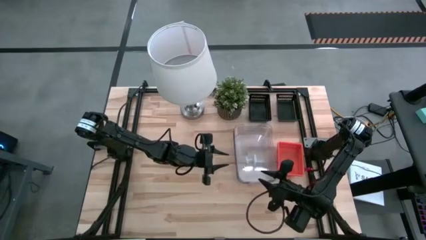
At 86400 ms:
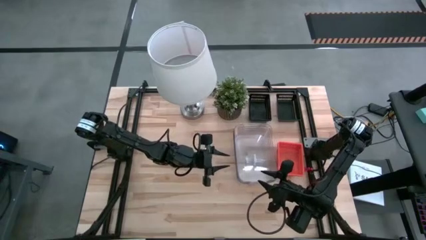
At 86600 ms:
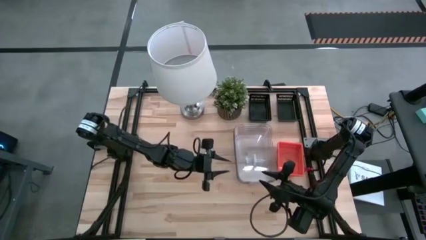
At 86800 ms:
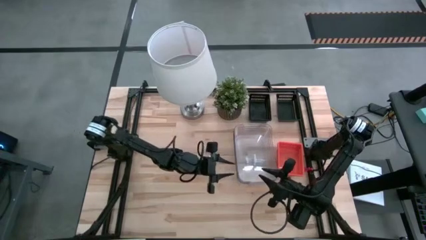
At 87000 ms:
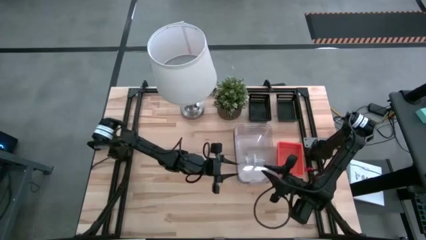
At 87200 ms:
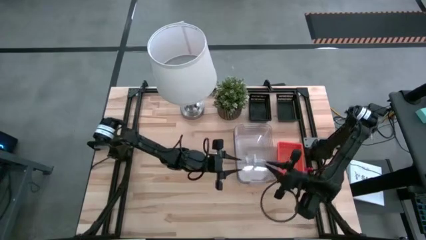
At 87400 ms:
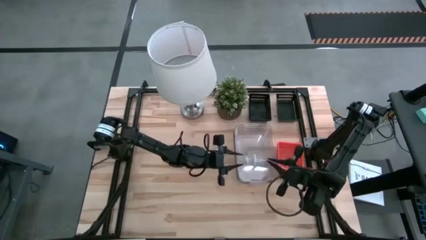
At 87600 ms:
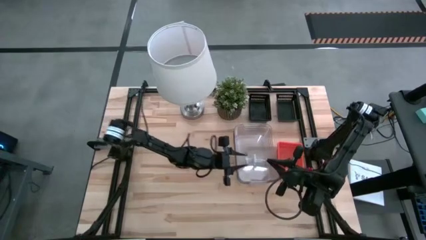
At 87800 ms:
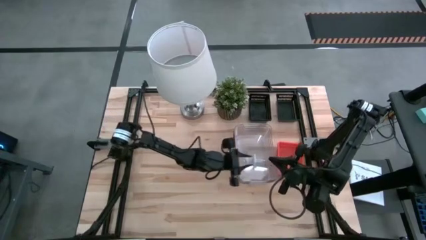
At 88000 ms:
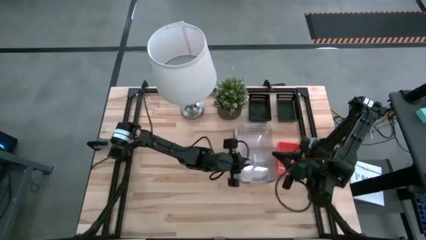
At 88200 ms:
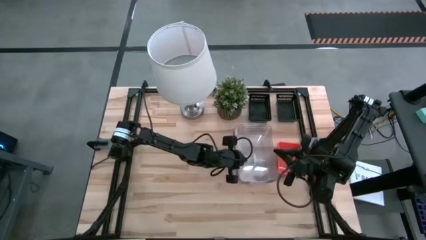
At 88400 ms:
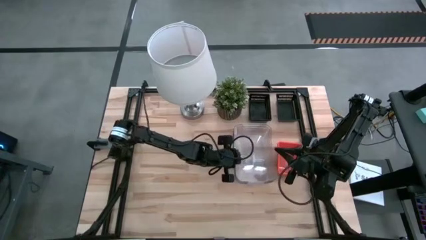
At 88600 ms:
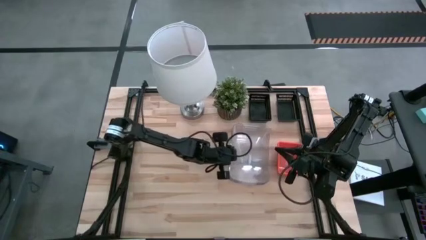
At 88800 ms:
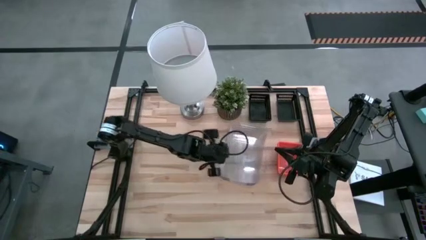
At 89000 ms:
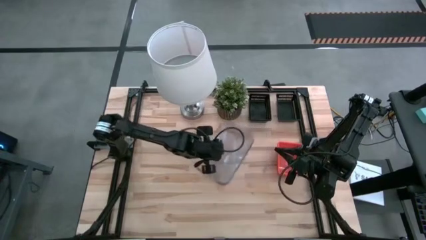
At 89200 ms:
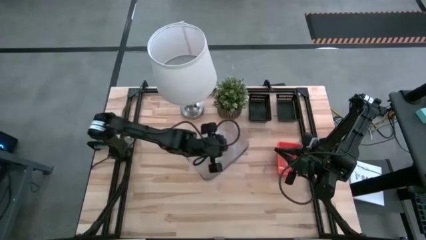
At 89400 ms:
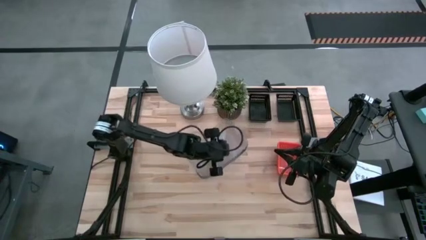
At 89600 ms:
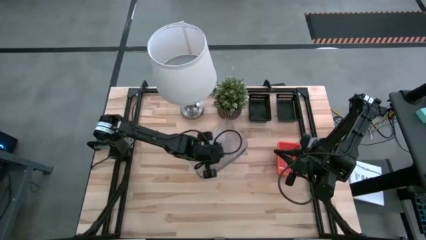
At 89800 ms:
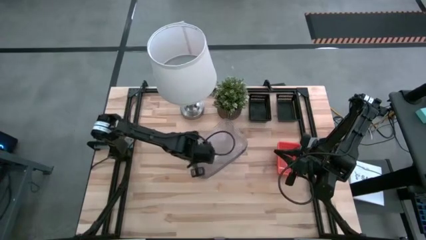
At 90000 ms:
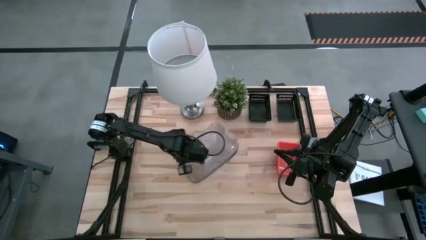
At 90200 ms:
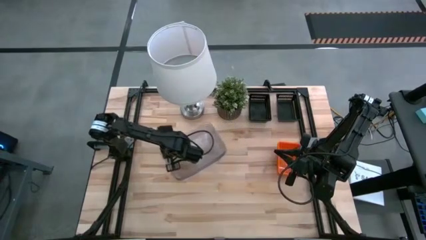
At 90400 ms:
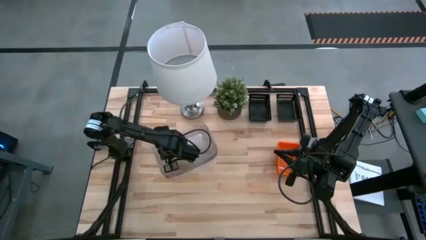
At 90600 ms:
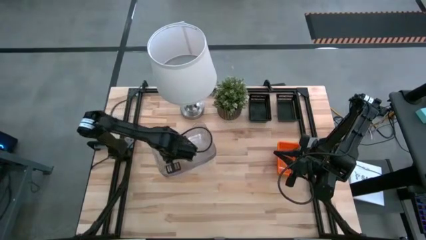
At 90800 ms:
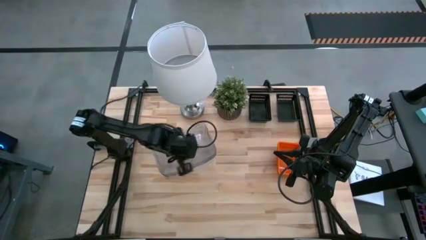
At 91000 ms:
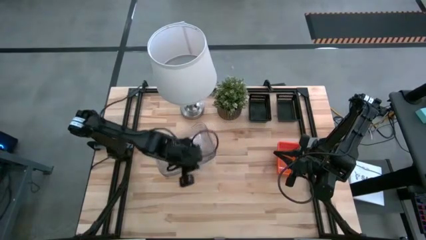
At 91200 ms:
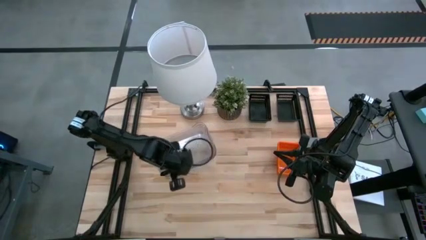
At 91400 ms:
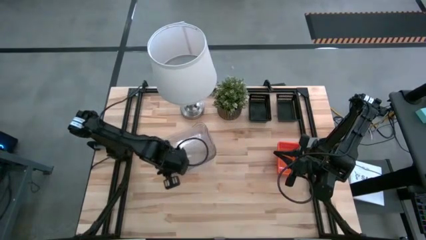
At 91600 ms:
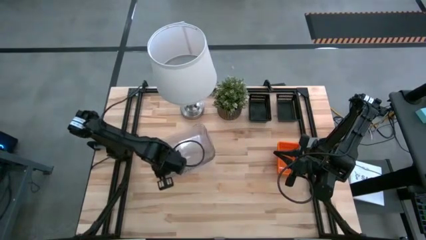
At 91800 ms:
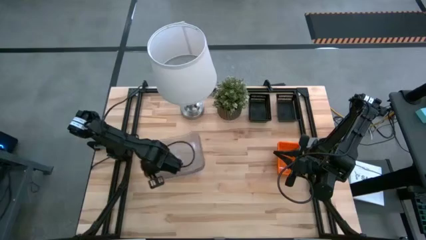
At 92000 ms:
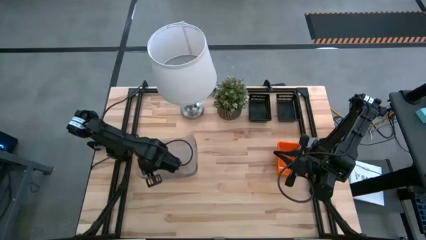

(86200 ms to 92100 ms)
Move the stacked transparent bin to the center left of the table

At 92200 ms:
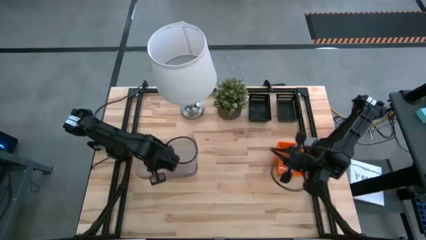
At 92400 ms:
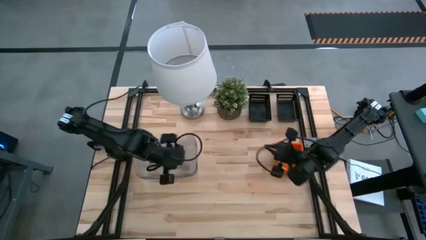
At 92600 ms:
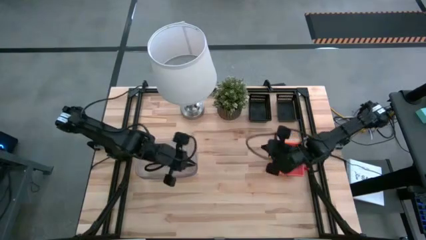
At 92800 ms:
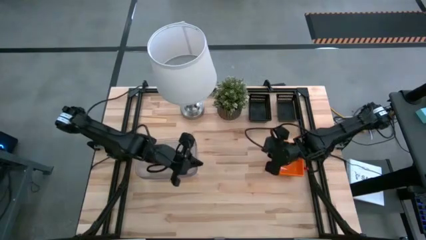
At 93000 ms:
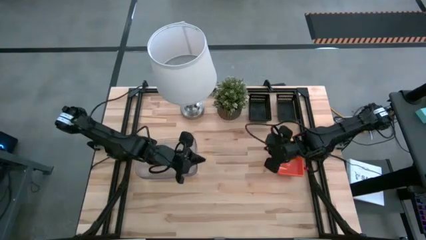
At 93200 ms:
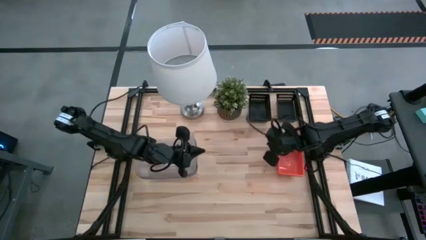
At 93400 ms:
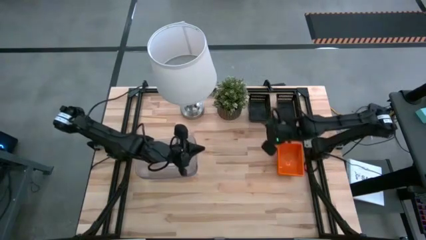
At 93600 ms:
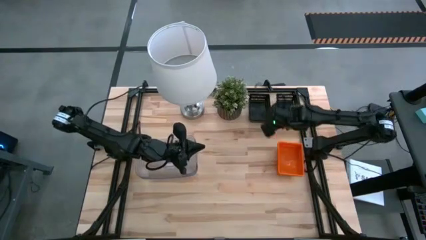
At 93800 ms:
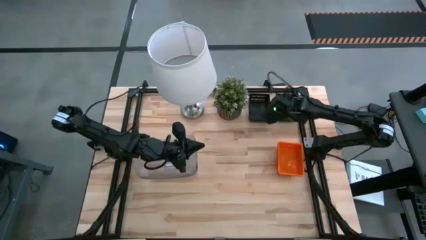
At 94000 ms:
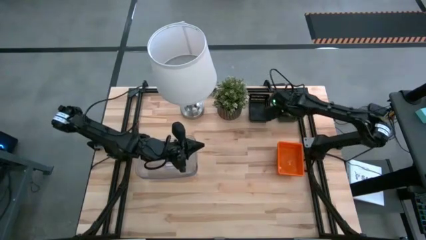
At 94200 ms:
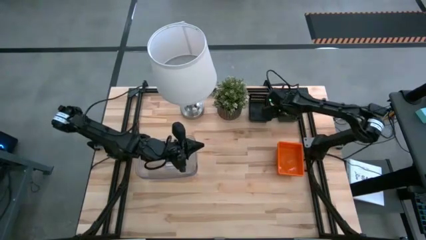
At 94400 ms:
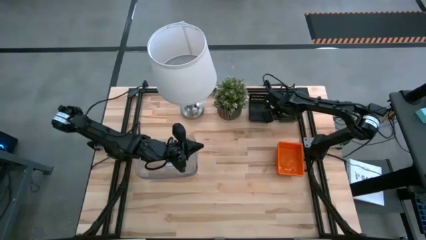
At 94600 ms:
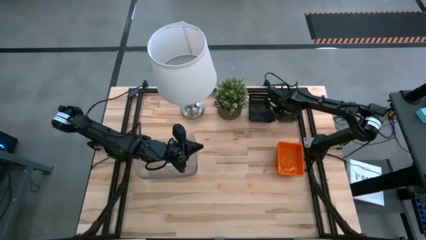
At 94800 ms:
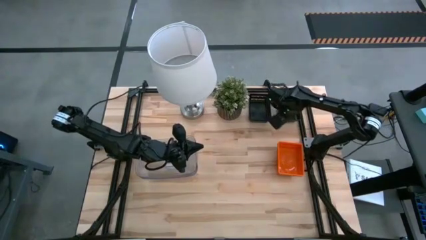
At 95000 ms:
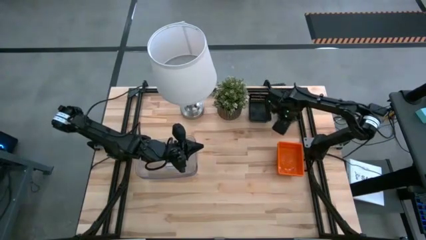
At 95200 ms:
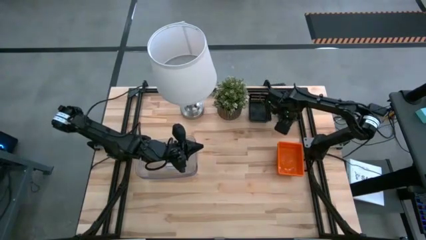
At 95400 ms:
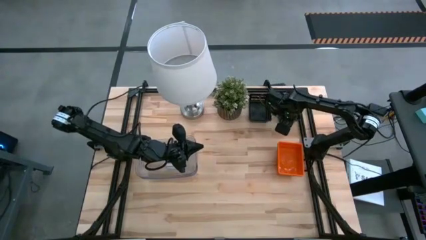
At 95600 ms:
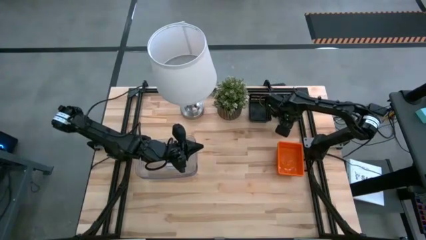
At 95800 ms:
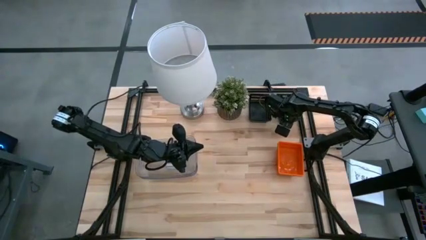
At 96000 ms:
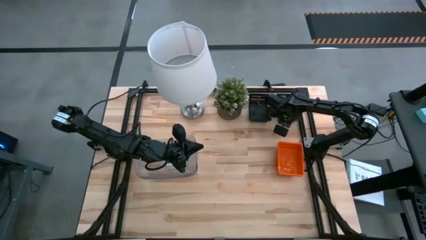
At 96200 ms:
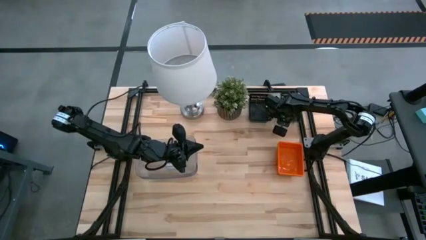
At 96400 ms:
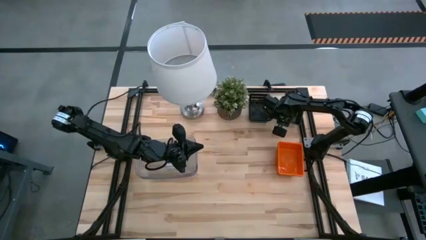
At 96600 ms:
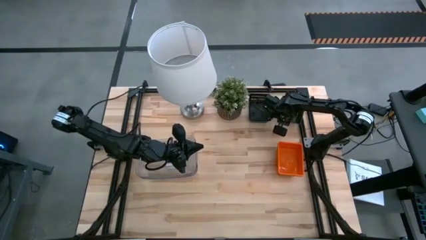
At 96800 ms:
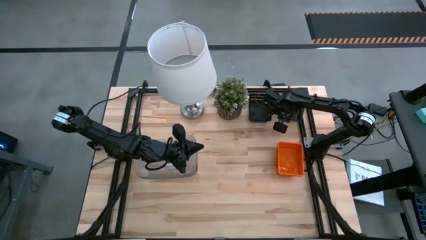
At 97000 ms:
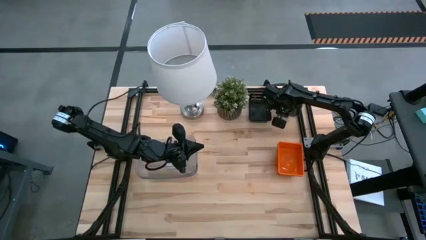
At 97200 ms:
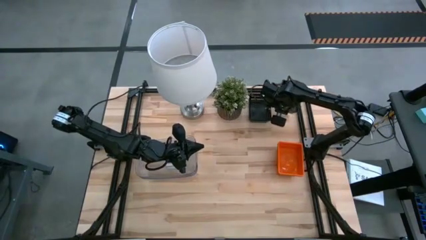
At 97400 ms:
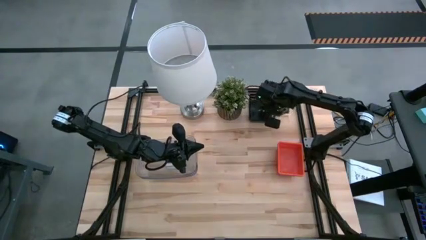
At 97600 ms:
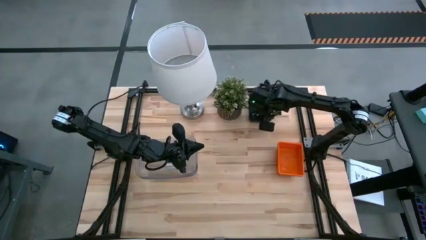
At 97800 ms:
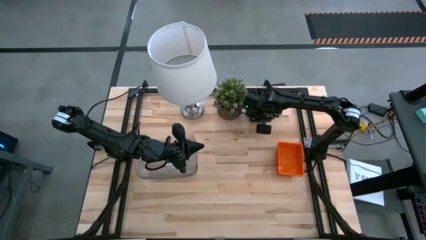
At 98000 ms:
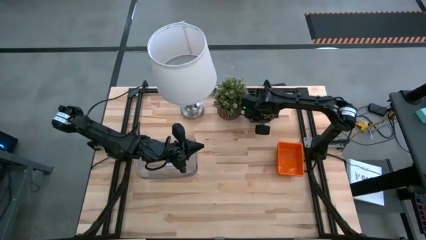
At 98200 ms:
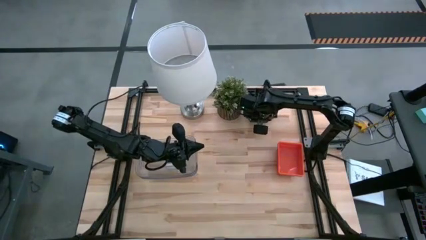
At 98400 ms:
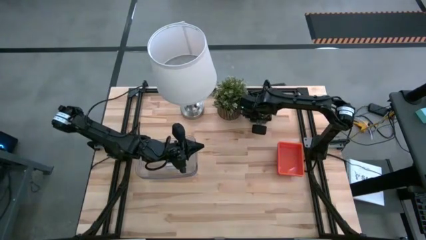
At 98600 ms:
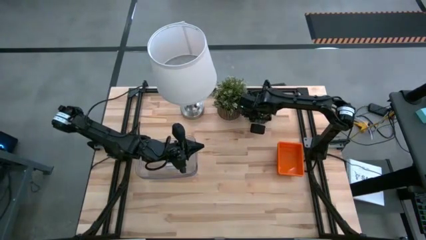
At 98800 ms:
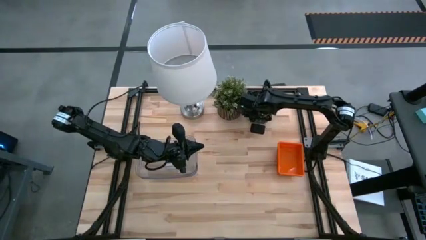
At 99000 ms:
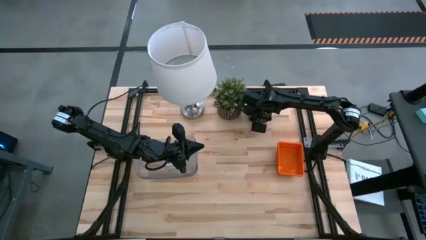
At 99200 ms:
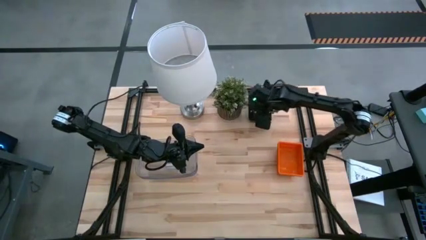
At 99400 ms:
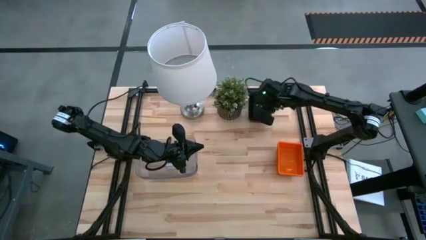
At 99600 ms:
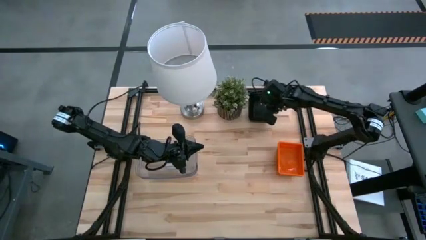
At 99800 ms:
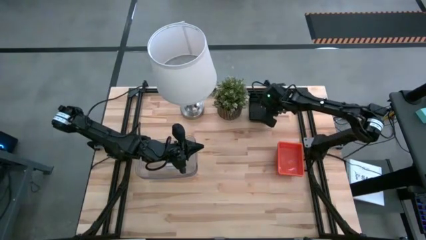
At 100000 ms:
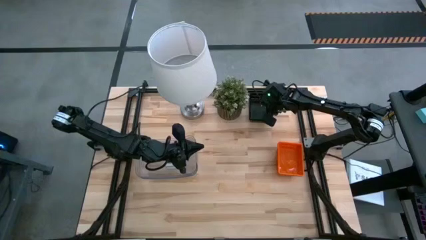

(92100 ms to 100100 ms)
Stack the right black bin on the black bins
